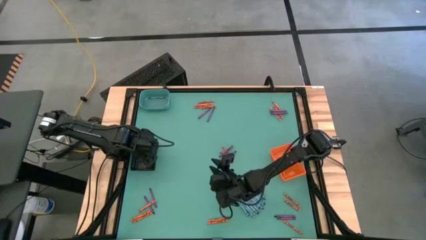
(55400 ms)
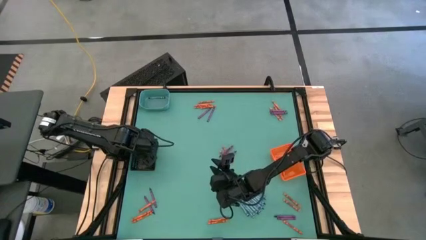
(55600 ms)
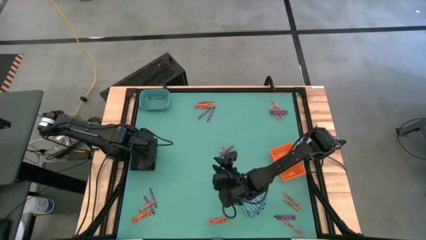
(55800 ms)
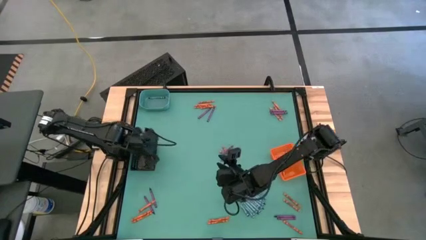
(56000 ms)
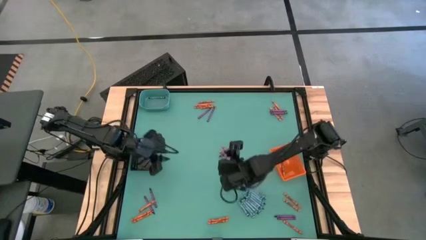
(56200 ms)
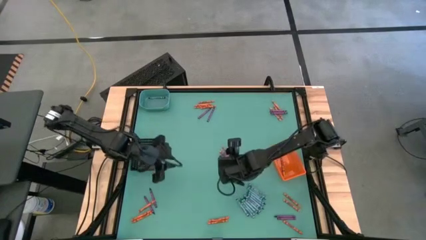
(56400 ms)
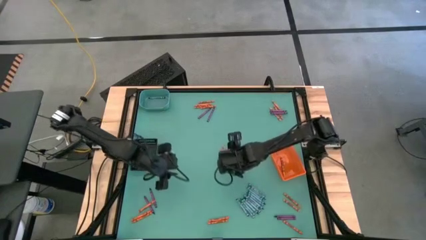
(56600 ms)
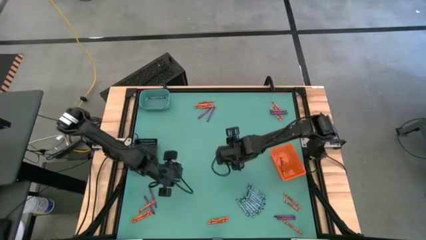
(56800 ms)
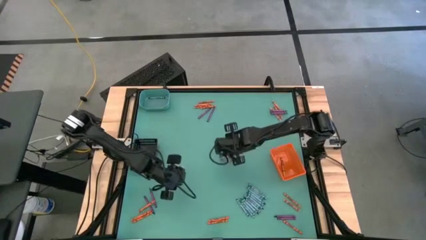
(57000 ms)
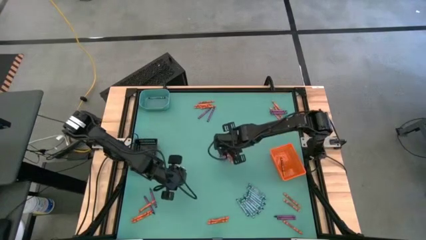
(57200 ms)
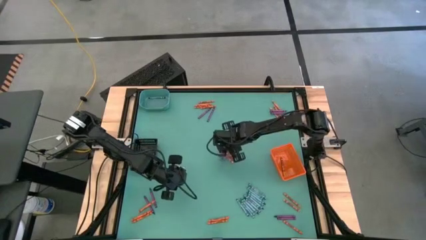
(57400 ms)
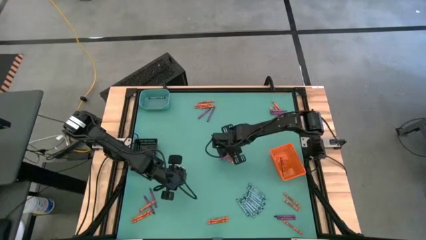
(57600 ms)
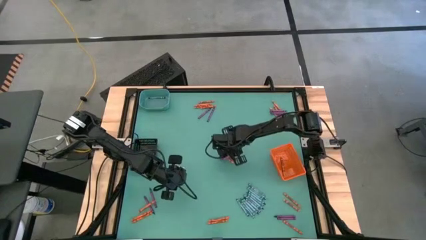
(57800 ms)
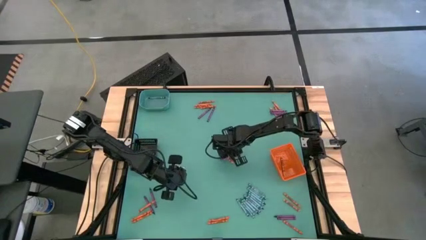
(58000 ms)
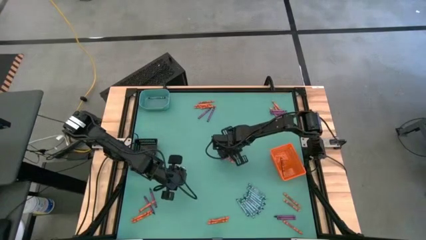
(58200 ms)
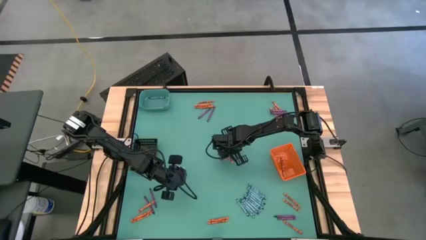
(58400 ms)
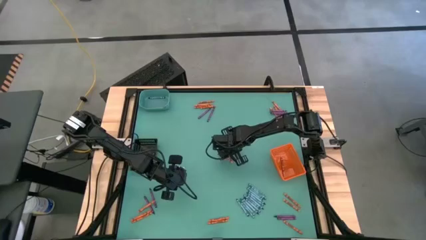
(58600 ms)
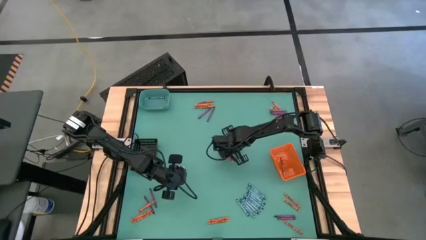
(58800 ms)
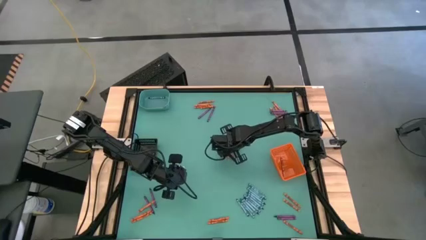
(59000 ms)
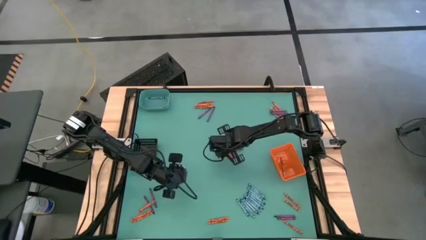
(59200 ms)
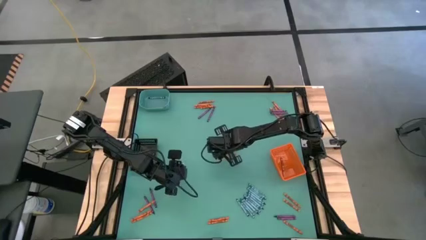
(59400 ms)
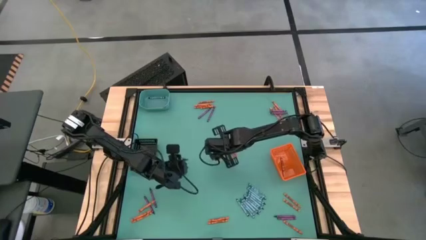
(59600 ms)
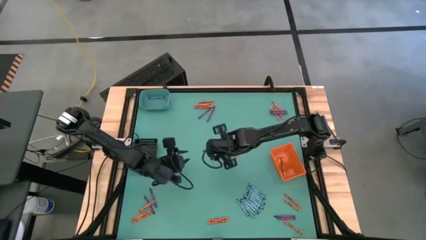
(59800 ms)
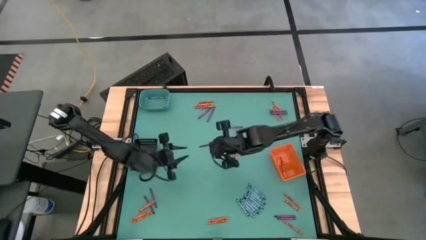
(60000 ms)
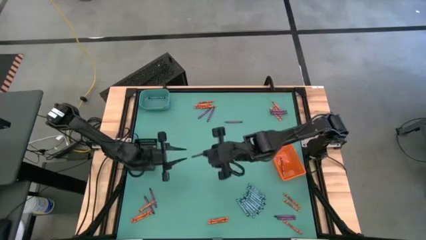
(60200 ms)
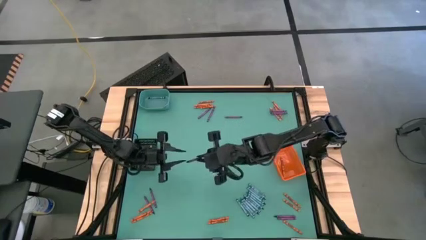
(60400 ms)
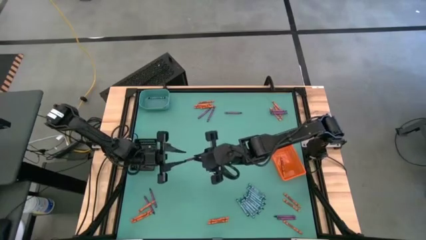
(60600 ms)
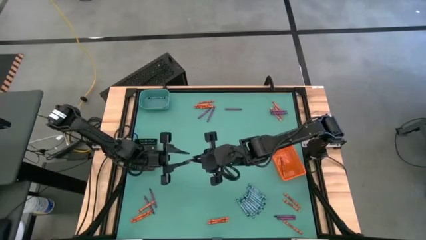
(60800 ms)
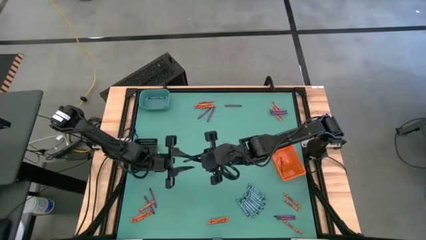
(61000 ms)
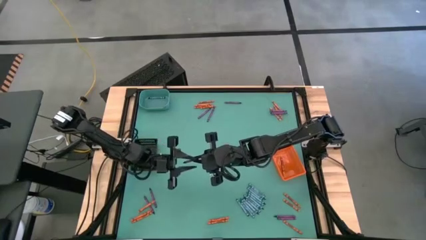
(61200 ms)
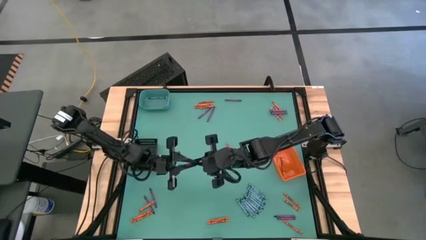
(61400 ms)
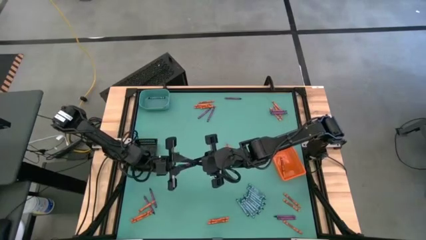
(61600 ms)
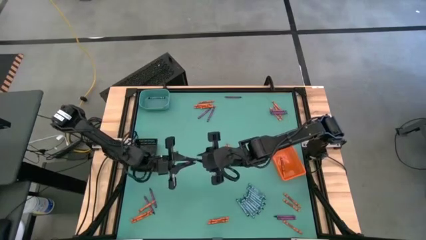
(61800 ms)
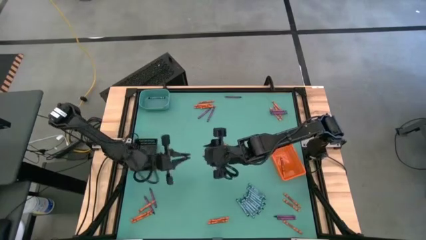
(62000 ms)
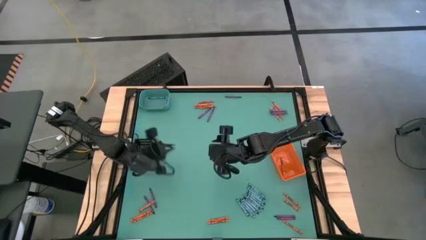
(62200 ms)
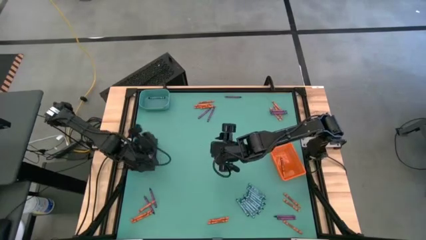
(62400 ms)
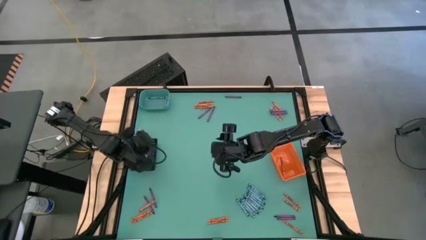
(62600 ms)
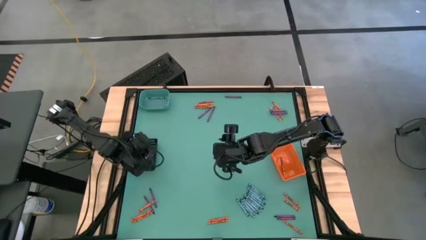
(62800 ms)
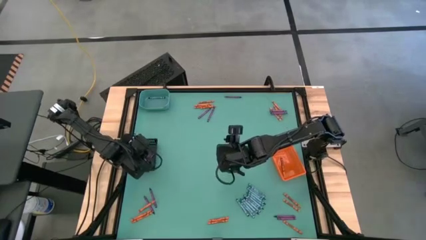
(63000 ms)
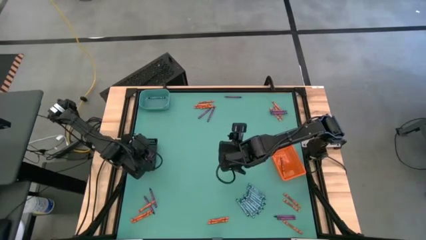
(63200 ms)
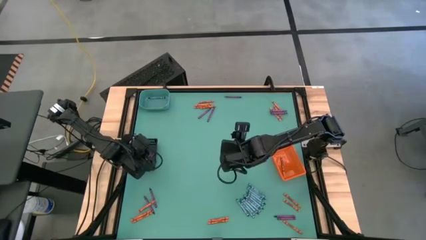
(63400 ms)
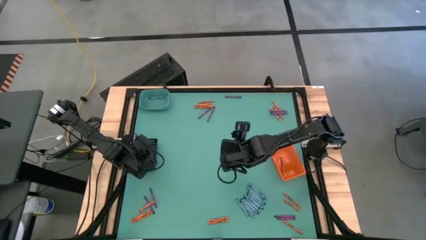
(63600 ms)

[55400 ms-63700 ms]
Task: Sort crayons
Put the purple crayon into the black bin

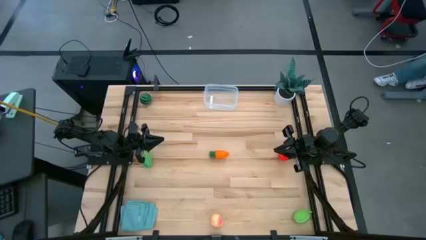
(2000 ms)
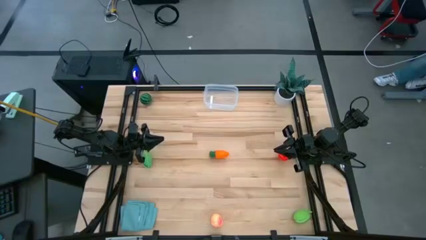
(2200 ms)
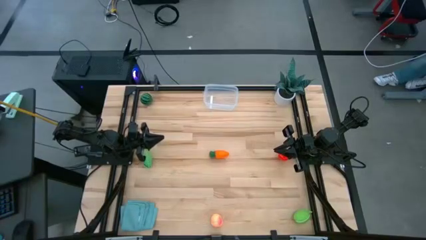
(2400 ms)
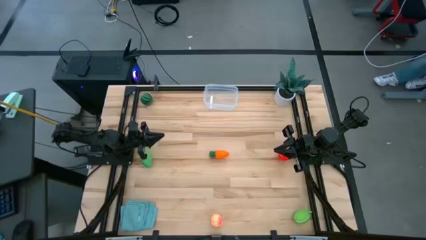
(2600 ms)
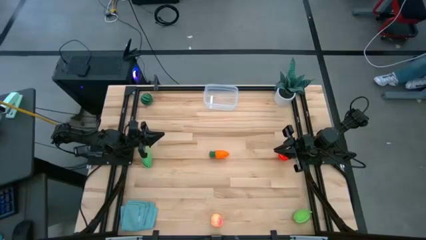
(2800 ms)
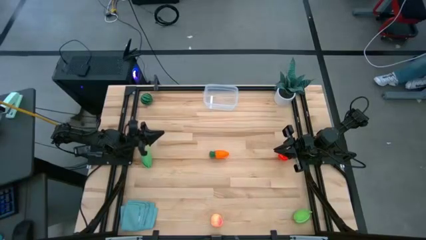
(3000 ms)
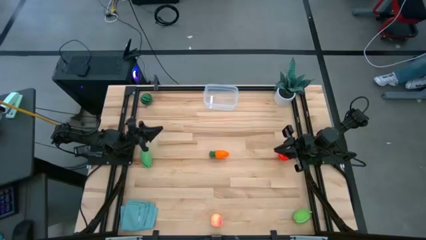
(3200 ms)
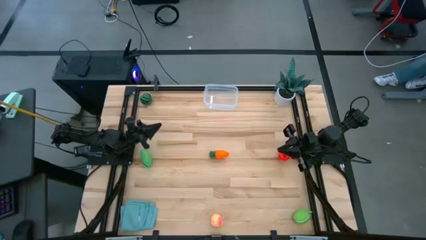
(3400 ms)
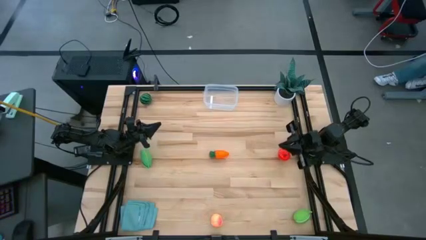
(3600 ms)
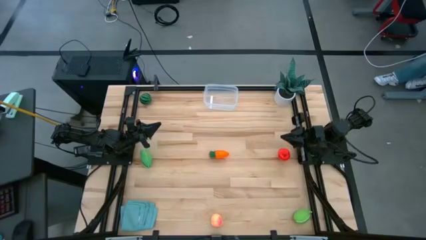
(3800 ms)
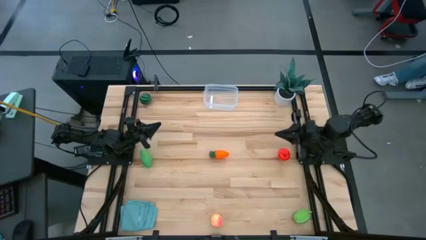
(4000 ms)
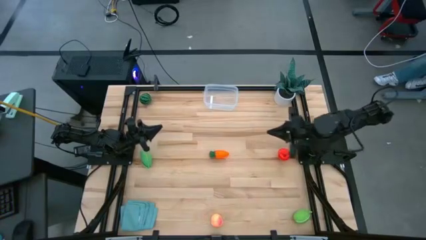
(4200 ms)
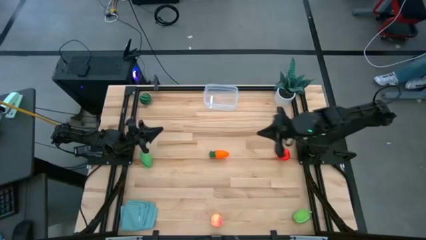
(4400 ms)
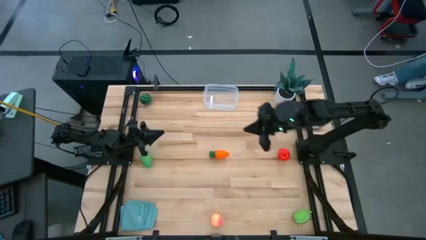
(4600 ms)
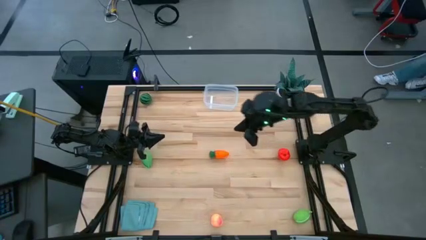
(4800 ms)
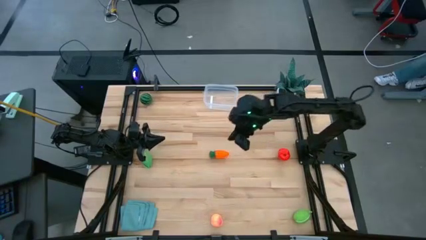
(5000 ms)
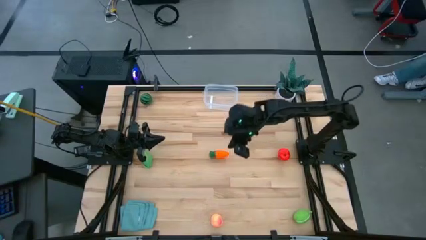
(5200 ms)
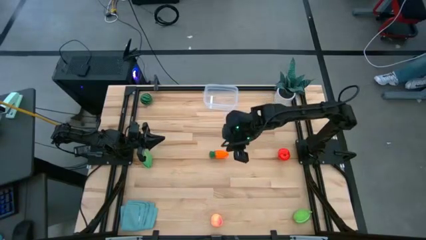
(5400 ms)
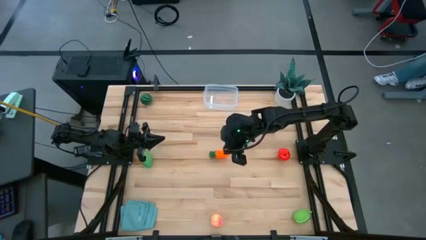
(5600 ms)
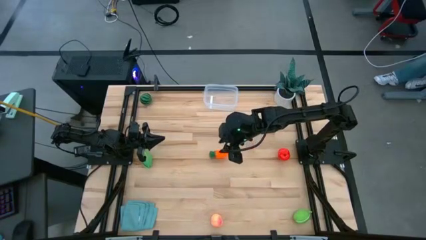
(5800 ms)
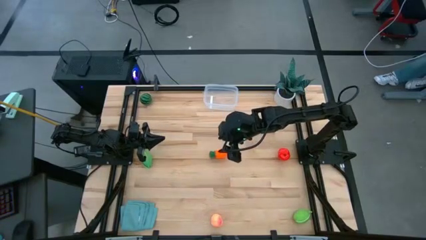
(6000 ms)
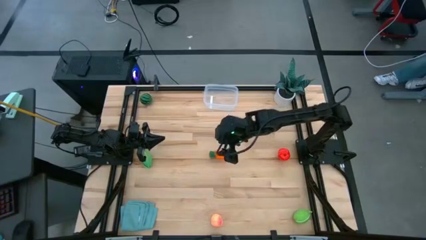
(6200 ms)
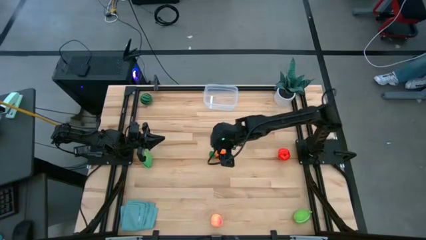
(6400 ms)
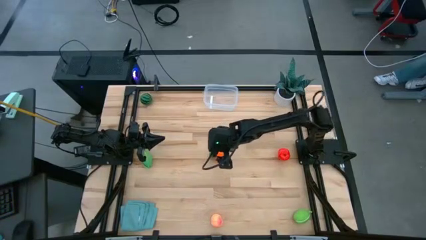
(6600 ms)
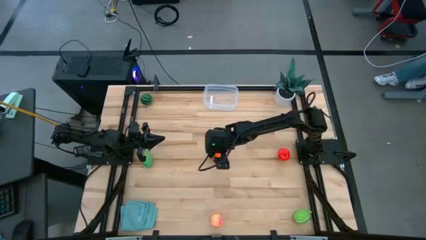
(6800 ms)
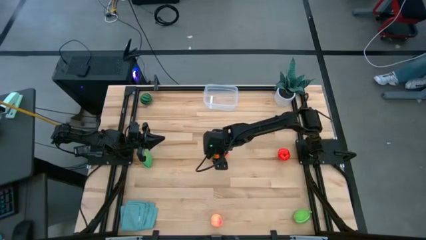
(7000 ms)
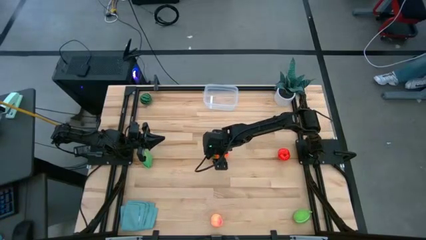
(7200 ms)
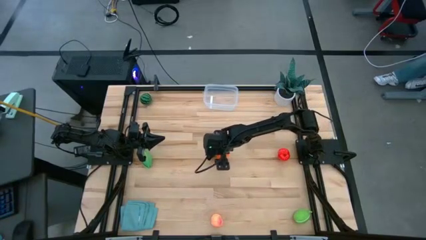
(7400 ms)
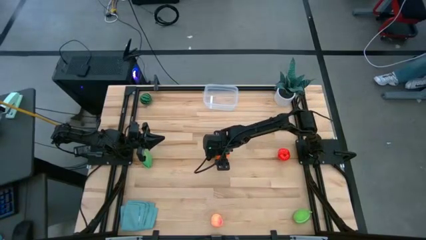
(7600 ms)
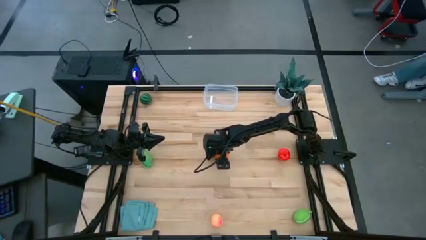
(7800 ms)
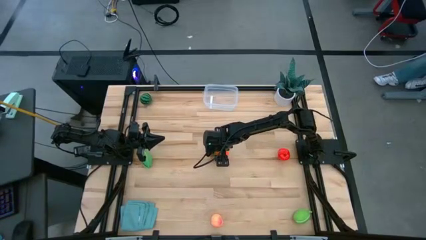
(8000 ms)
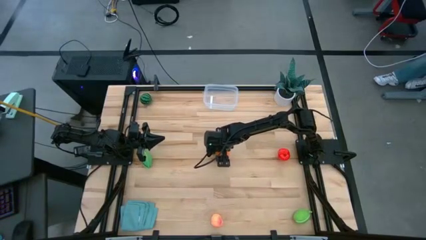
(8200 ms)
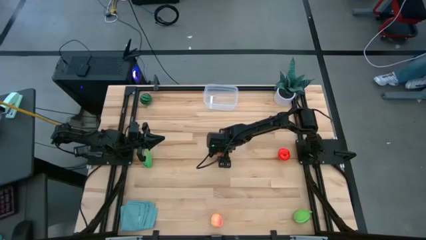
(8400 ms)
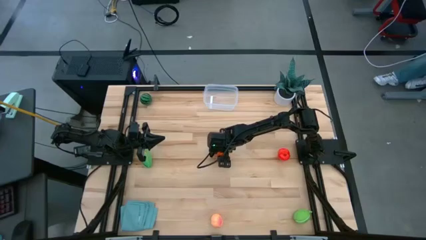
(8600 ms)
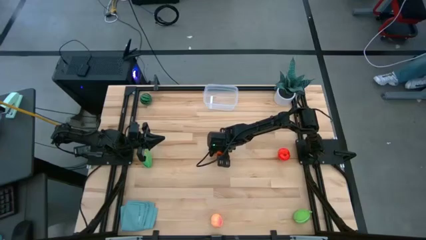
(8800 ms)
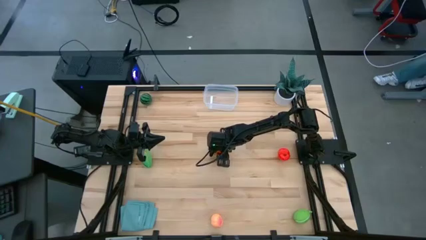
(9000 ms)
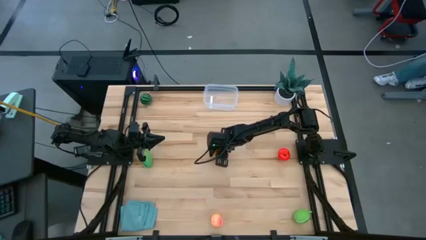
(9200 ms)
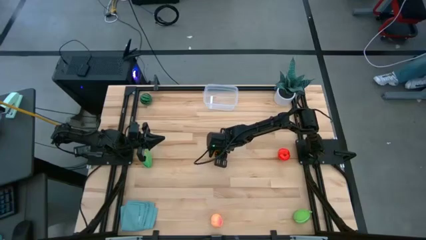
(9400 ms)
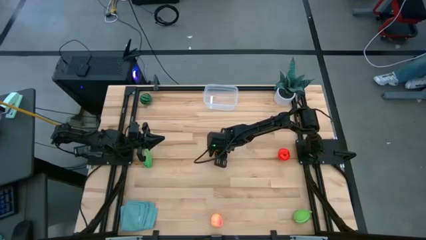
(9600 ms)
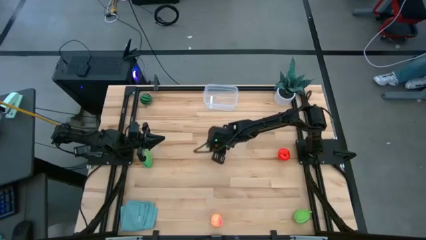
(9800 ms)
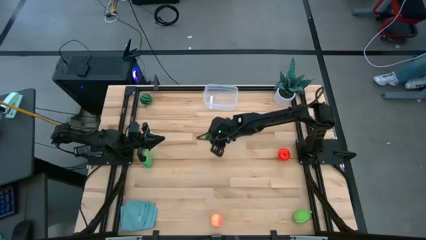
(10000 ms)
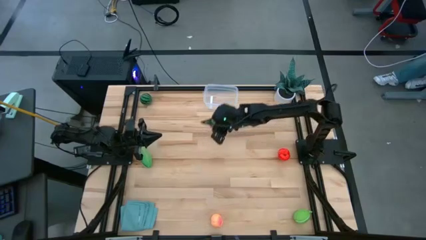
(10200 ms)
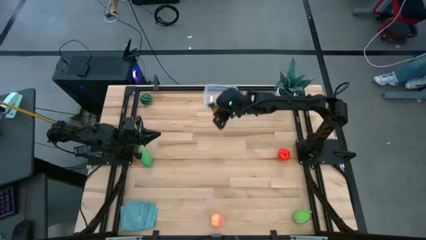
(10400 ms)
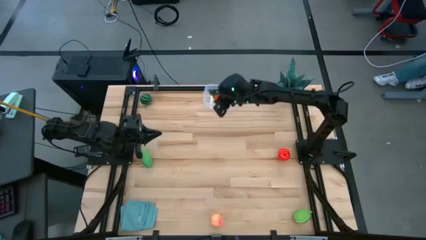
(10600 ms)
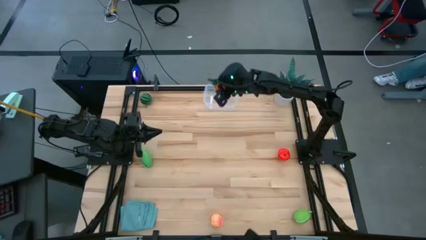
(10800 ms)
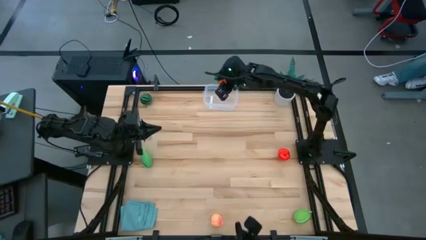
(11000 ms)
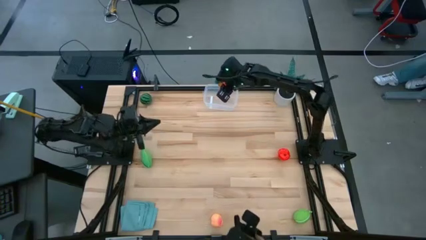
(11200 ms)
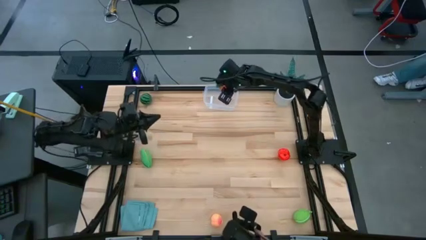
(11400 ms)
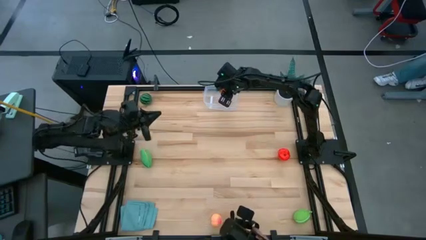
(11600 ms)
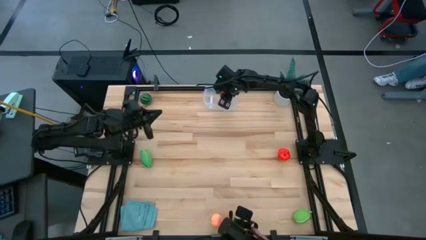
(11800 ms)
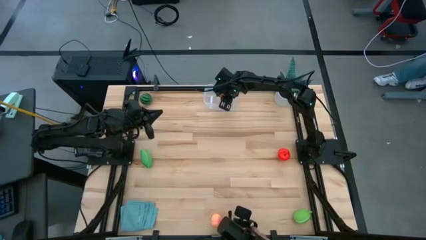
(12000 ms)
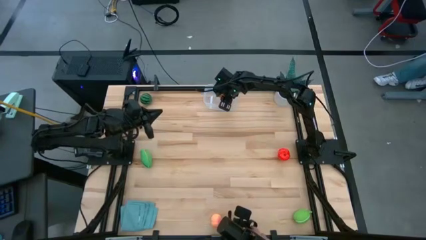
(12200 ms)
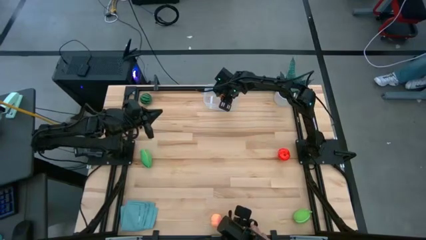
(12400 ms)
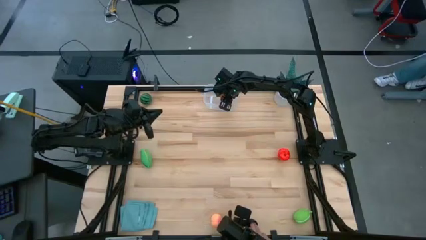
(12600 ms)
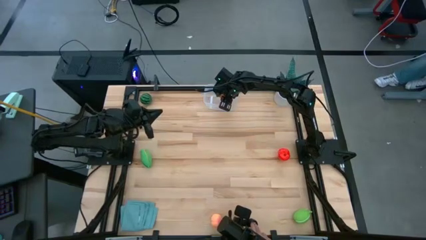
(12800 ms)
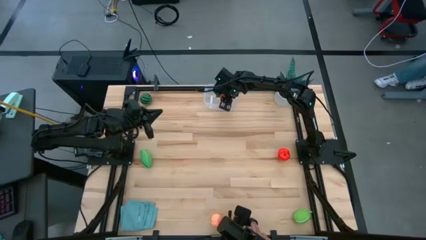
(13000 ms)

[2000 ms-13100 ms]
Task: Pick and placing Produce into tupperware
Put the orange carrot into the transparent container
